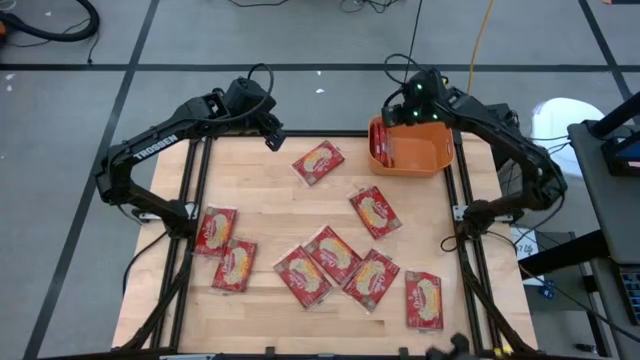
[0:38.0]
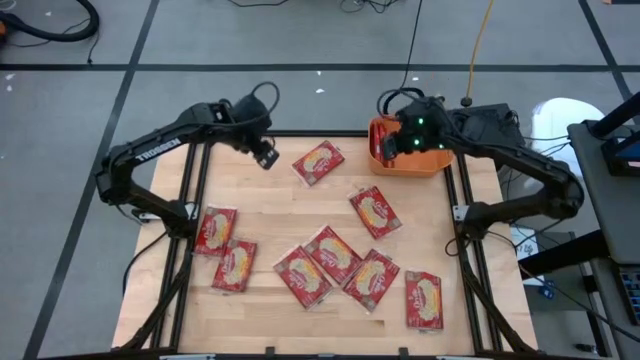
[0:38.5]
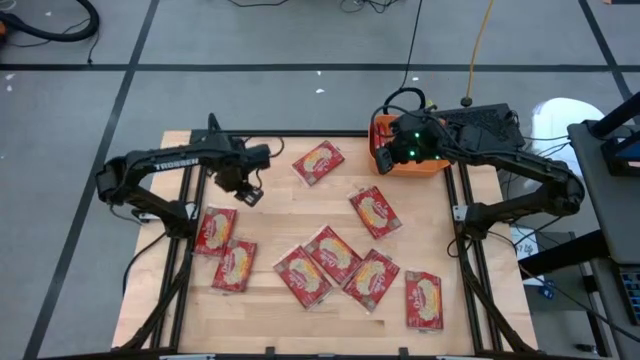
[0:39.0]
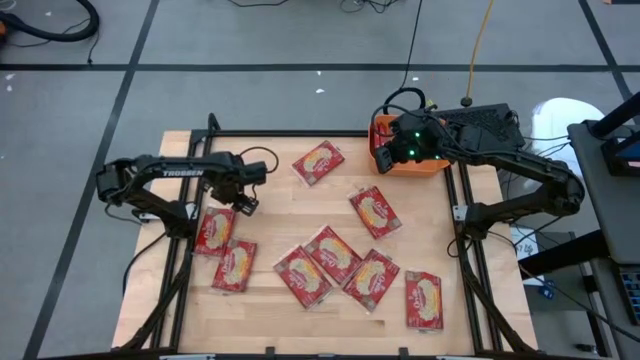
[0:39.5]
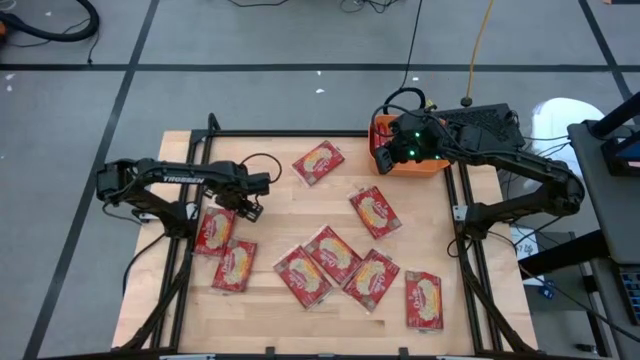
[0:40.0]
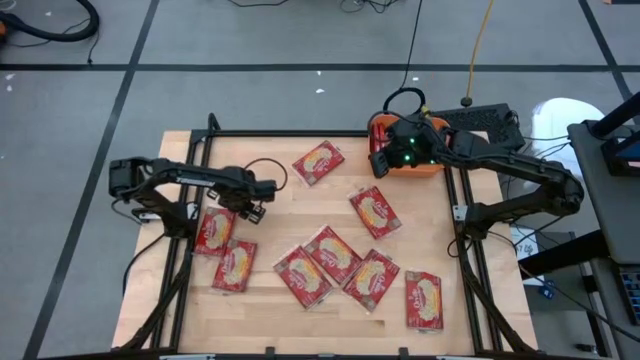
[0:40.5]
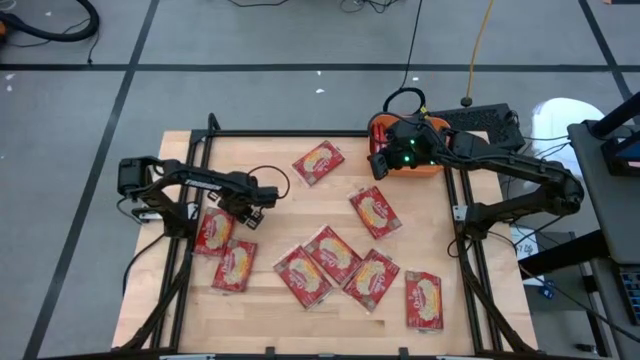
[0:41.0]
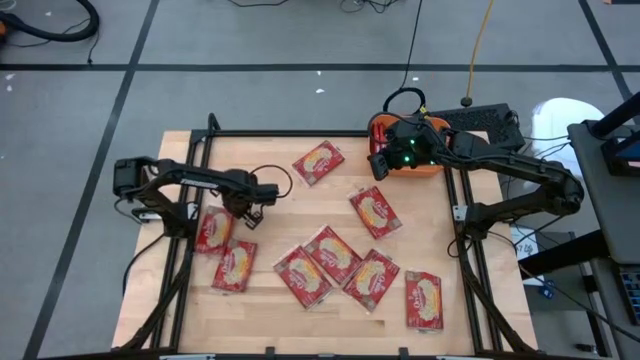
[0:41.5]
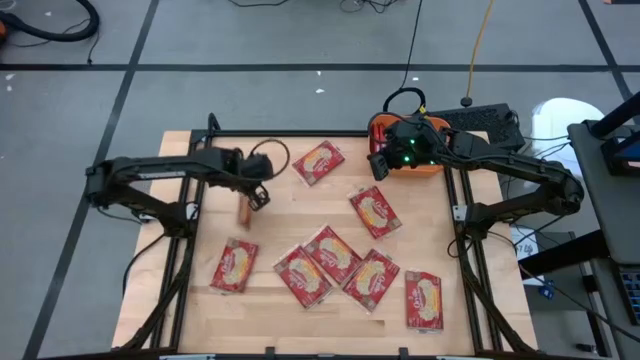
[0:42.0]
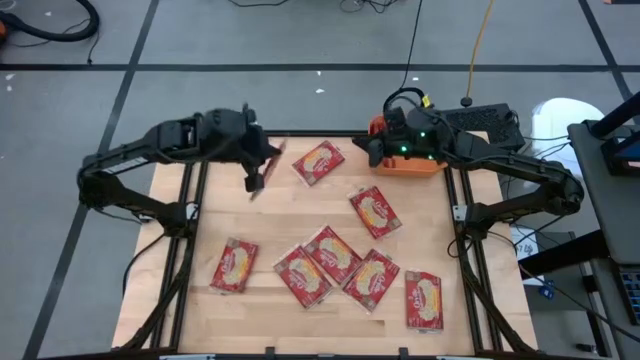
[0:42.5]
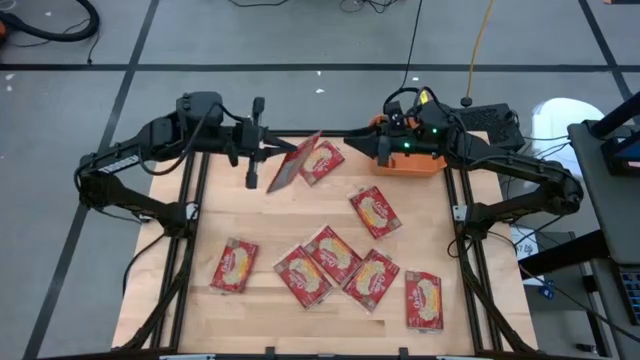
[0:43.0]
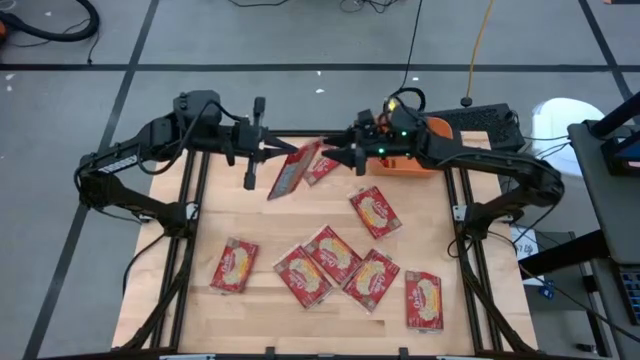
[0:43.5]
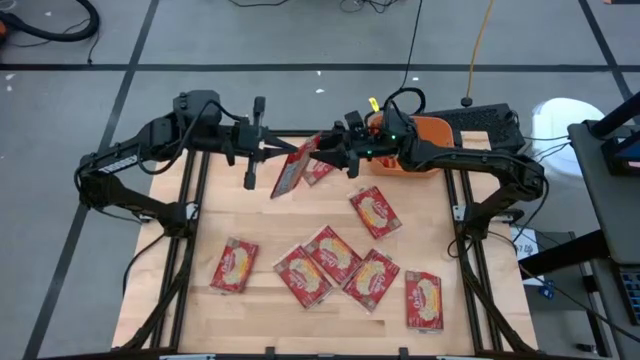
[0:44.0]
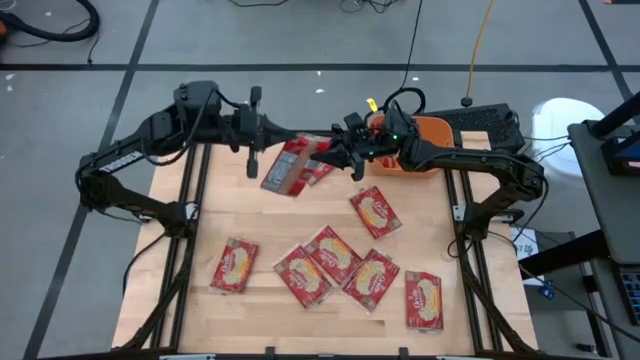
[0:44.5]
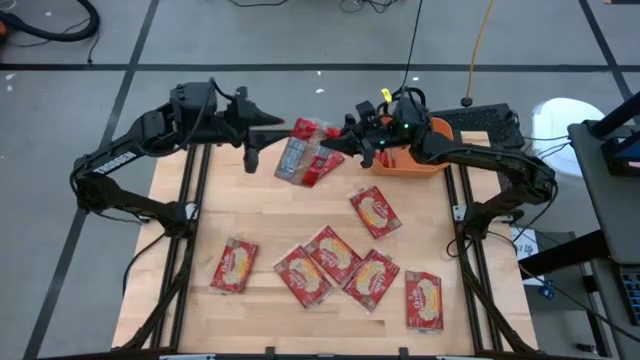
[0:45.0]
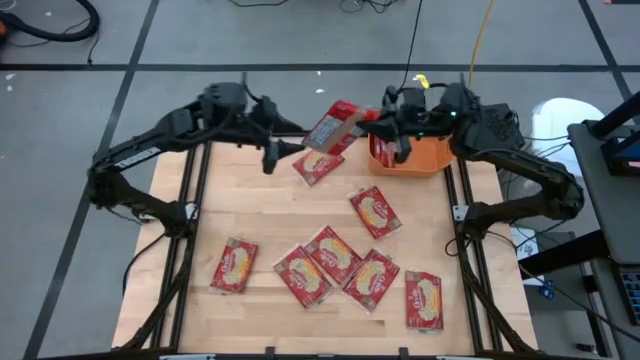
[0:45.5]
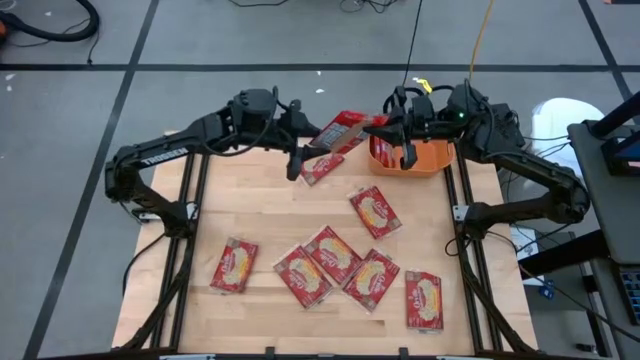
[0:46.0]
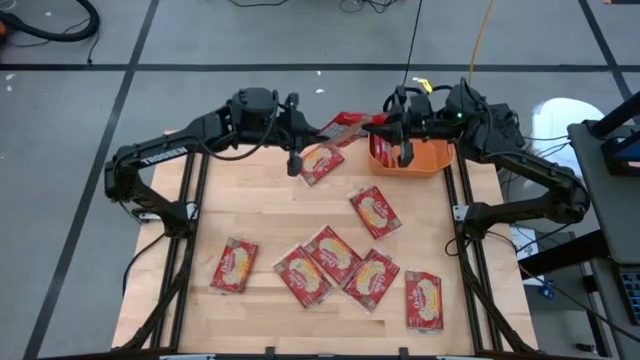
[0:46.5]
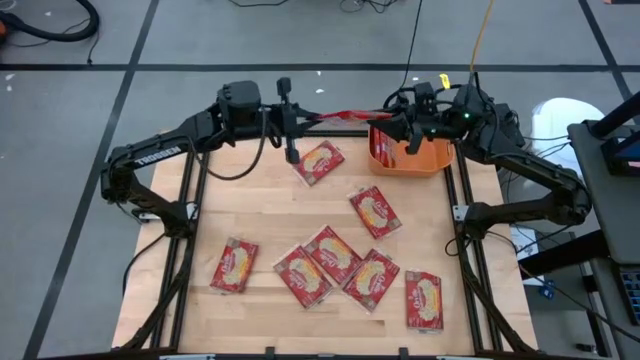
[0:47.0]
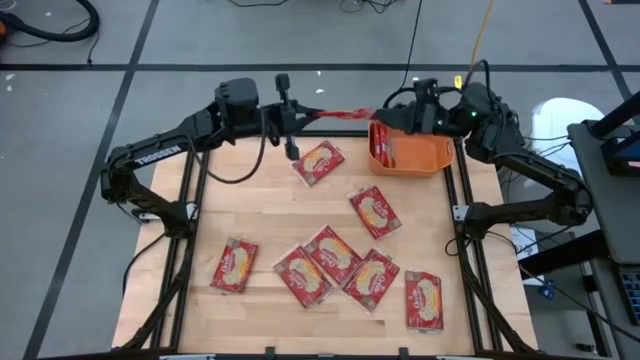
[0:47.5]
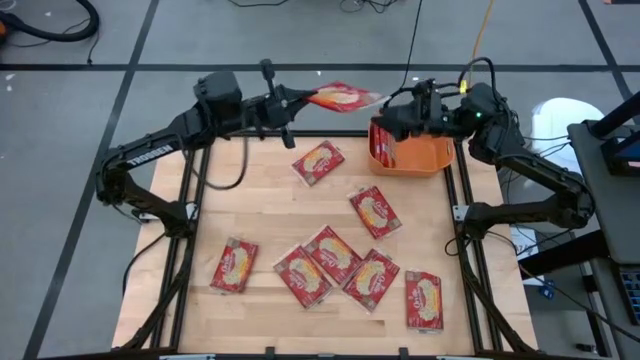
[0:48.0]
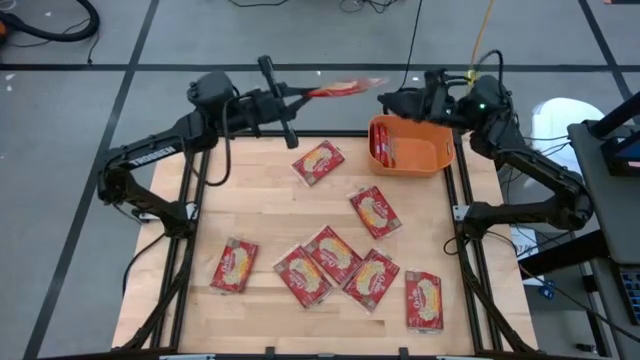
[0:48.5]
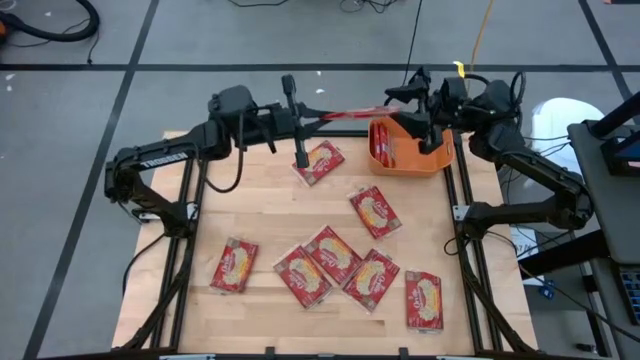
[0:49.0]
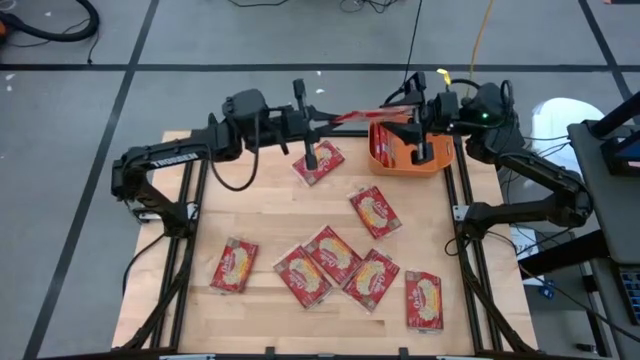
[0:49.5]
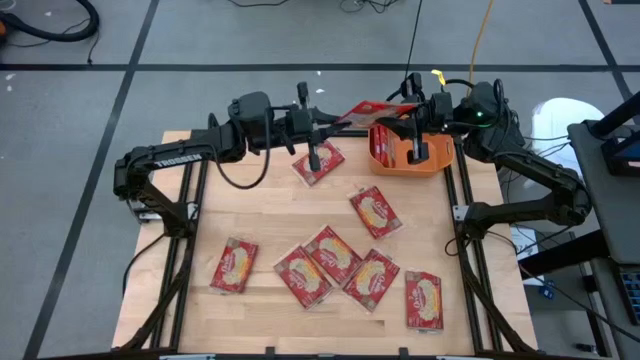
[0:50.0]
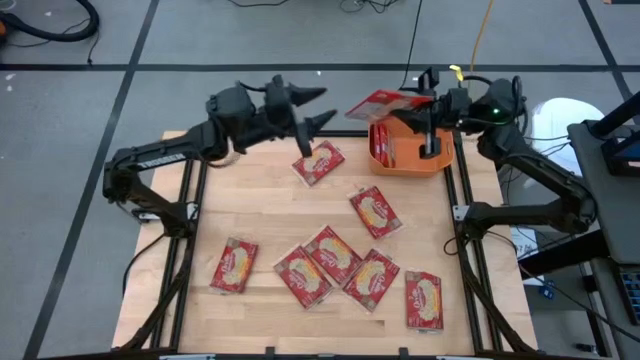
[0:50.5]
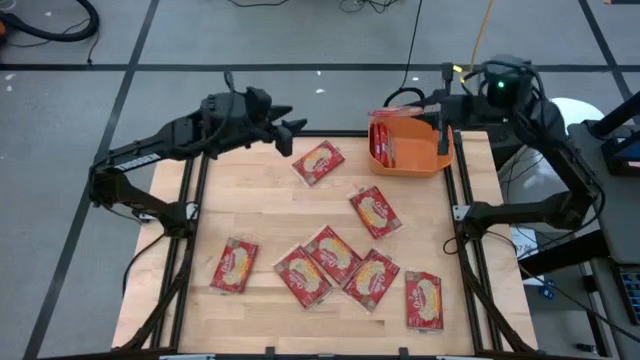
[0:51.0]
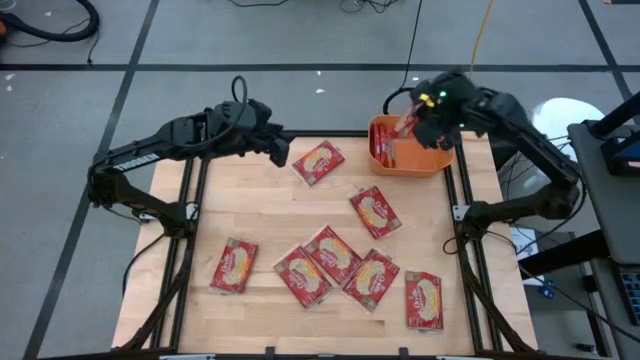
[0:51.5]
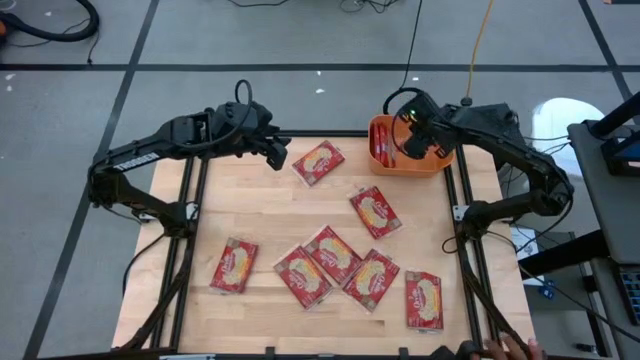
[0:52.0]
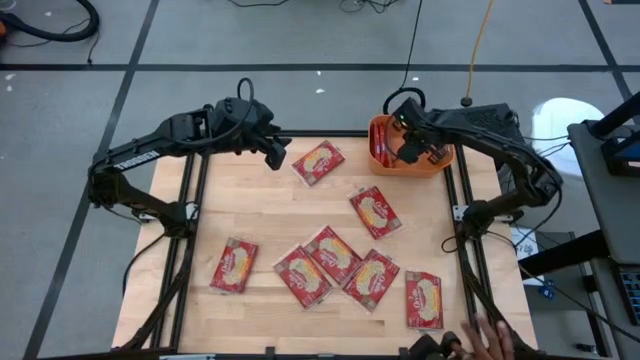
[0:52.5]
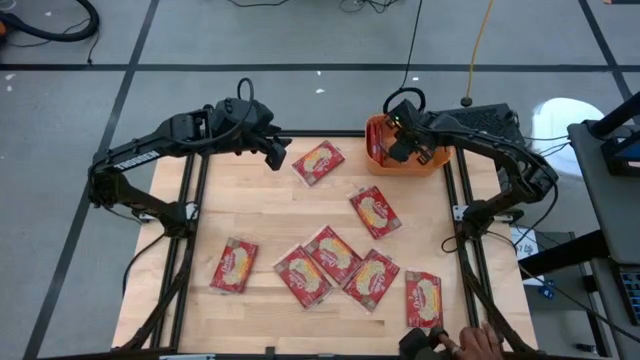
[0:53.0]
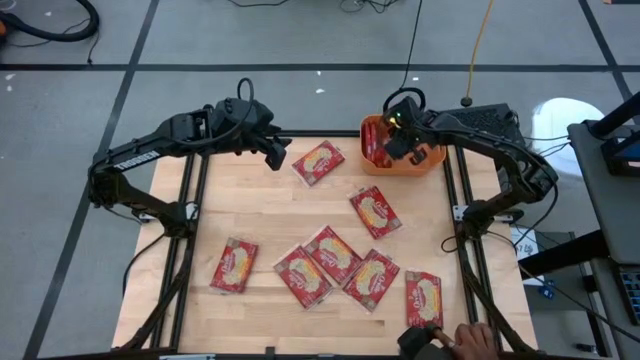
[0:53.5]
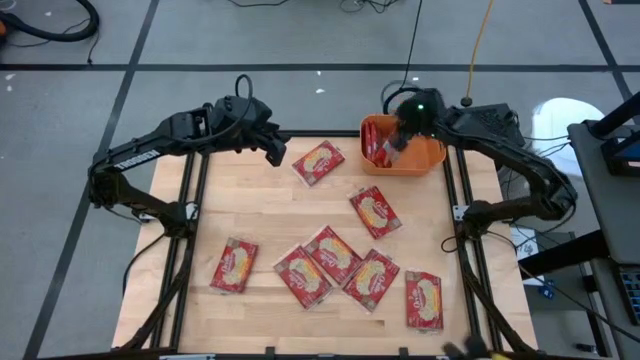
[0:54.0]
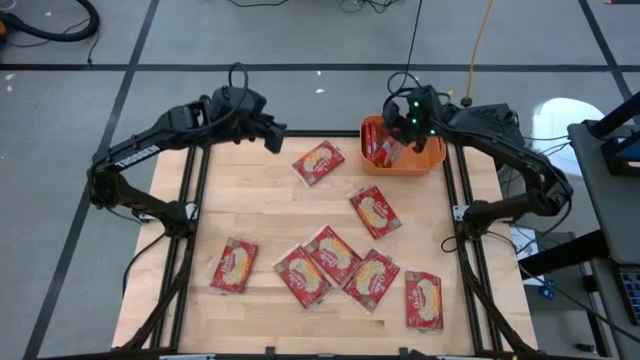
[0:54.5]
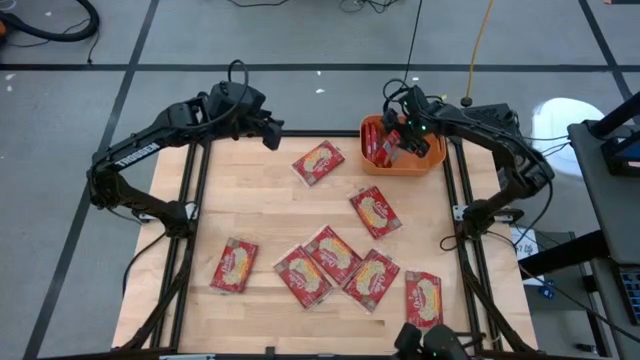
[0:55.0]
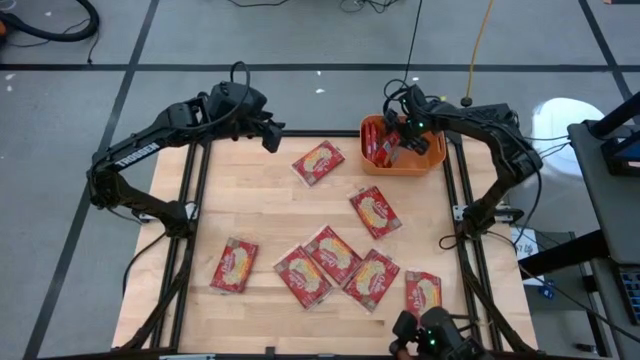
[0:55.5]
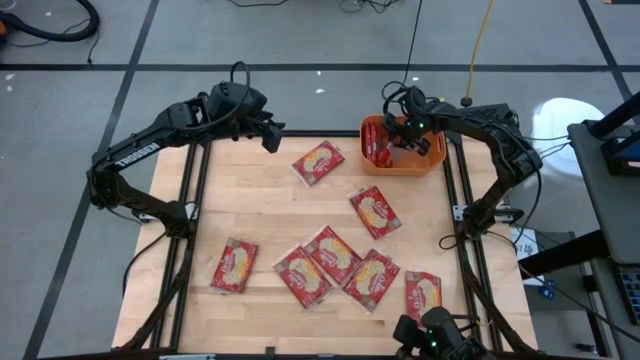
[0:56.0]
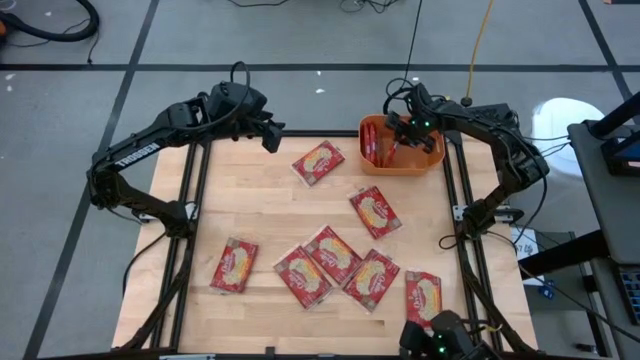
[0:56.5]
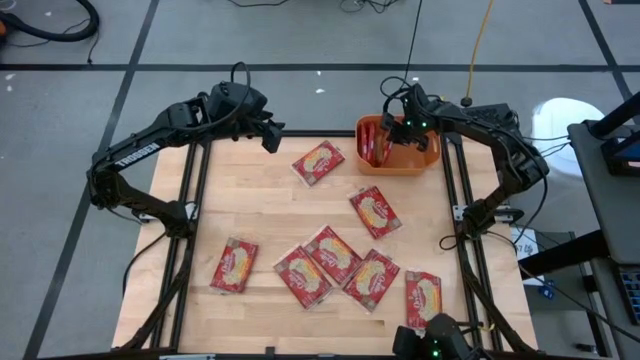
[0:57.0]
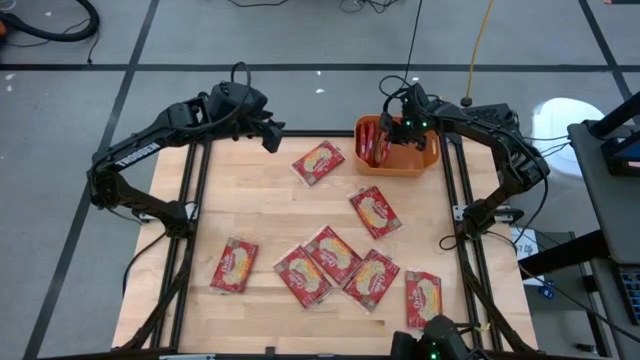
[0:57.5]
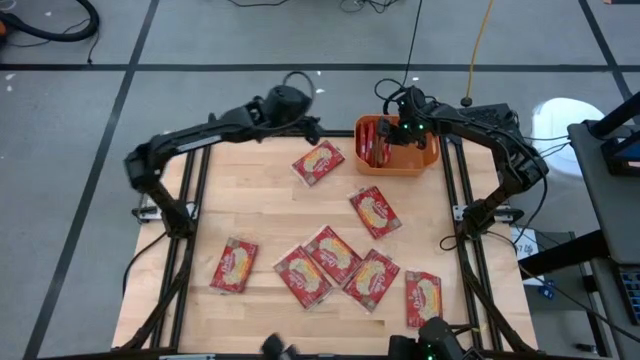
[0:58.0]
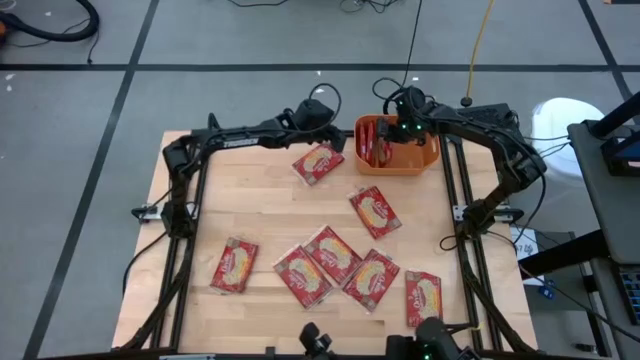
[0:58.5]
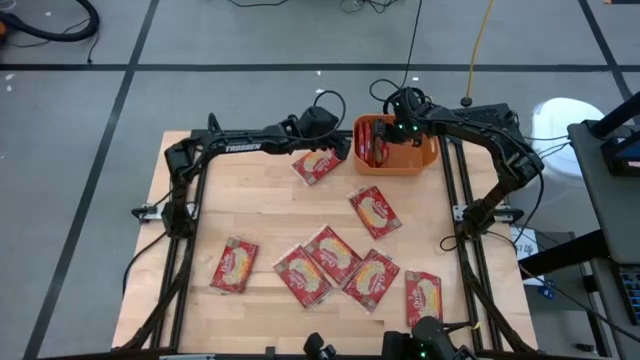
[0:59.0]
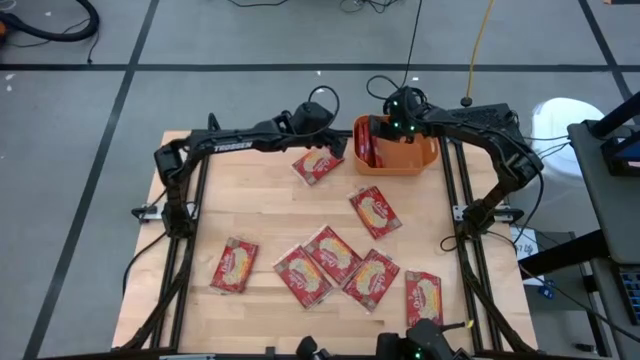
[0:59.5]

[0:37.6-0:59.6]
Task: Sort popcorn bags into baskets
Put the red popcorn bag into the orange bin
